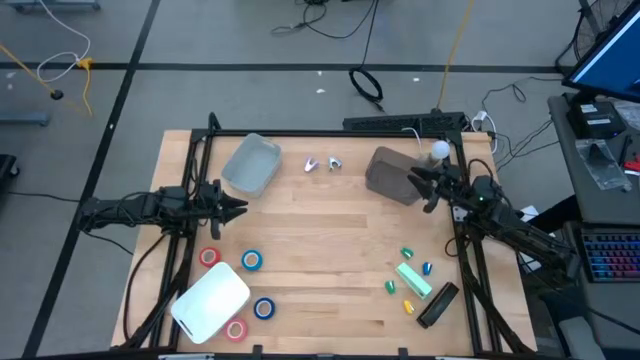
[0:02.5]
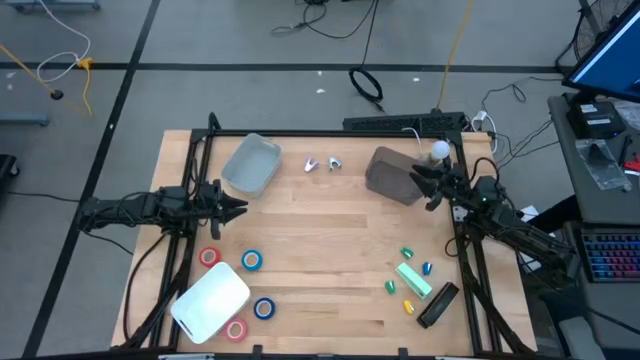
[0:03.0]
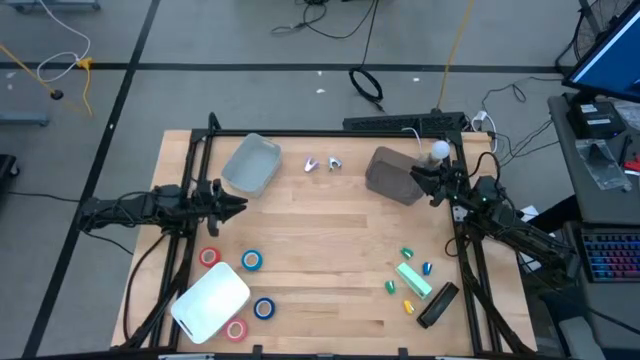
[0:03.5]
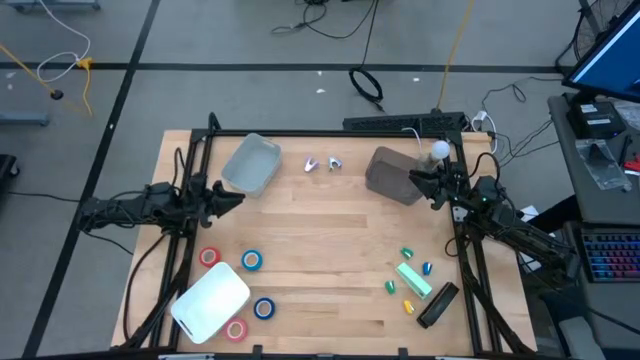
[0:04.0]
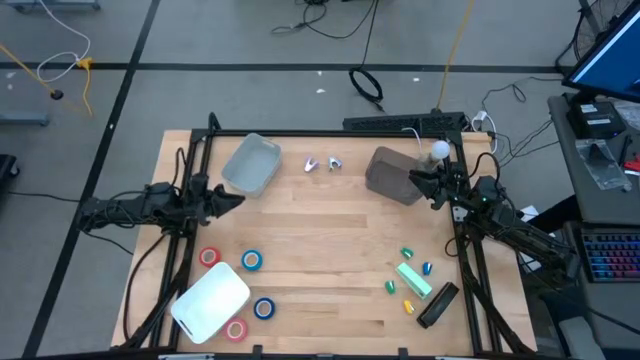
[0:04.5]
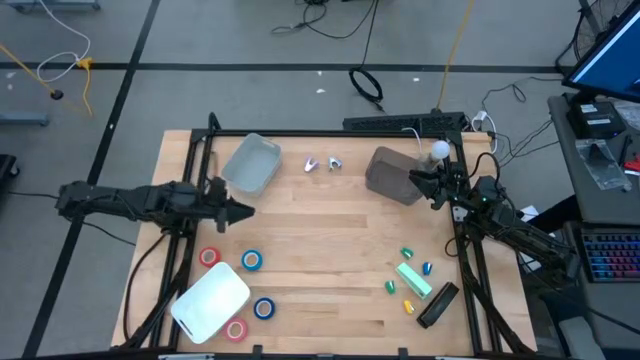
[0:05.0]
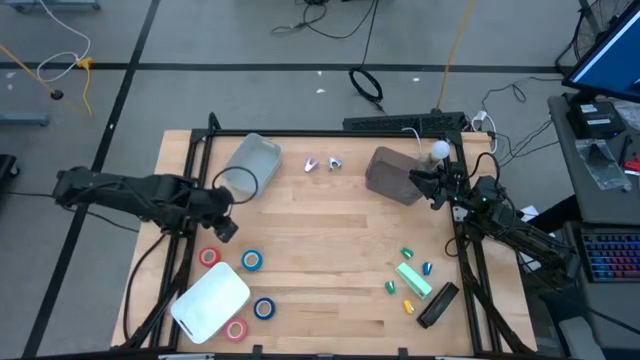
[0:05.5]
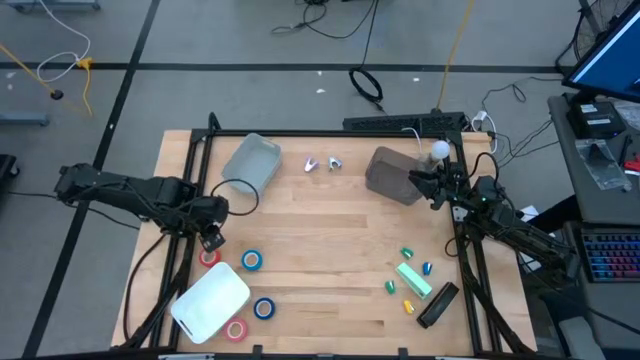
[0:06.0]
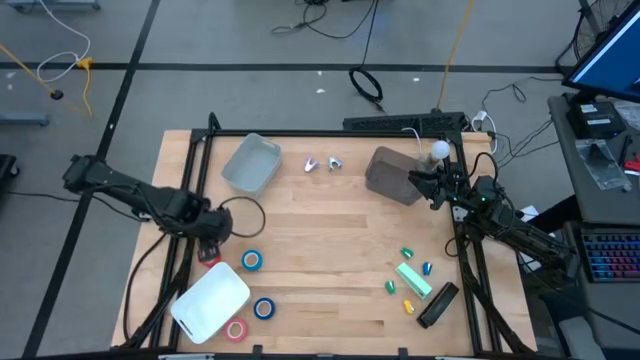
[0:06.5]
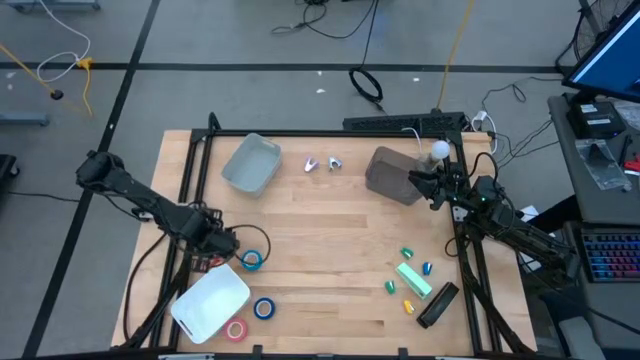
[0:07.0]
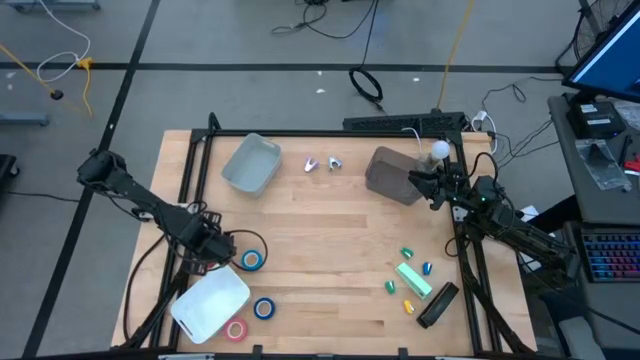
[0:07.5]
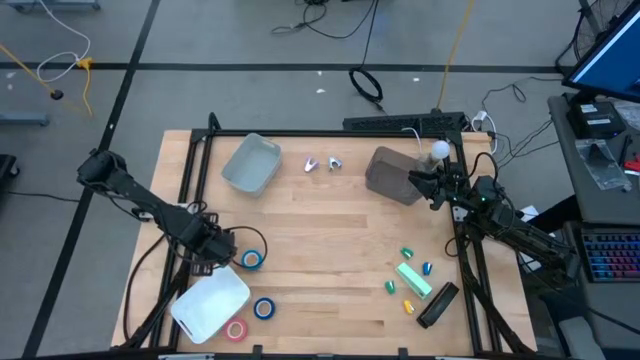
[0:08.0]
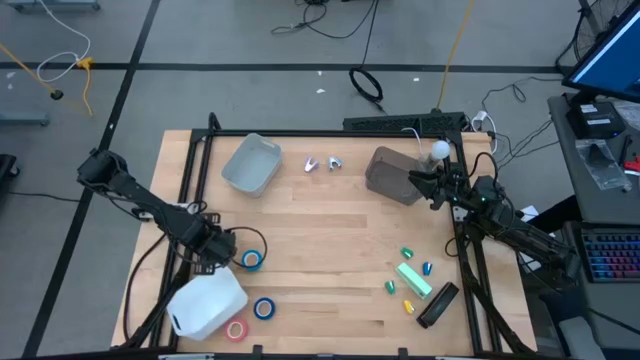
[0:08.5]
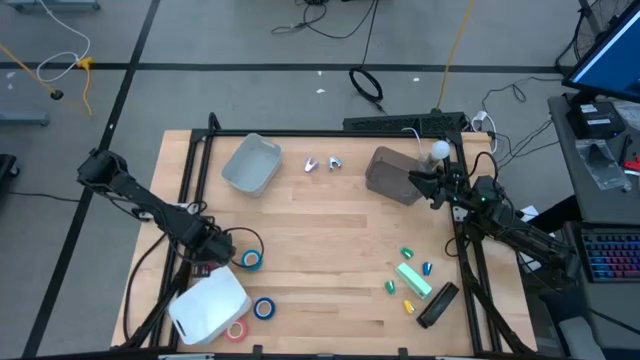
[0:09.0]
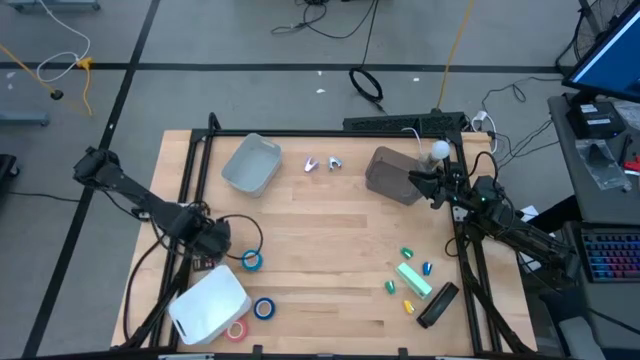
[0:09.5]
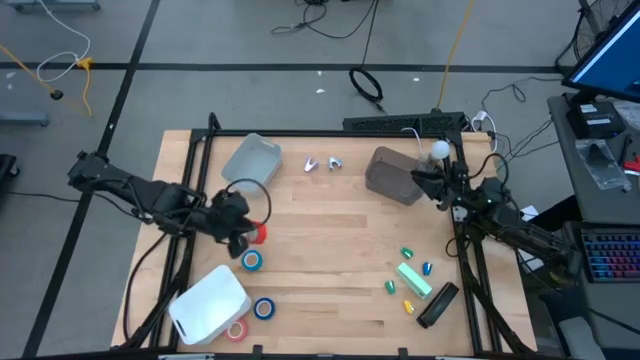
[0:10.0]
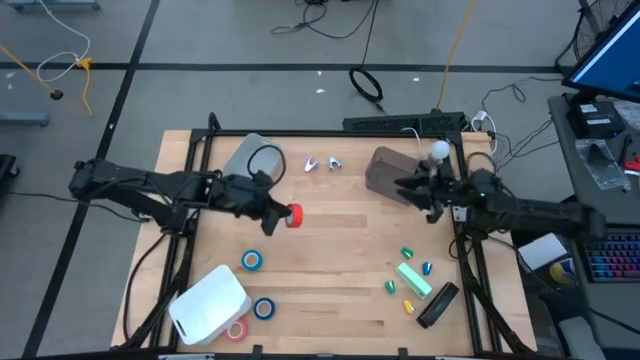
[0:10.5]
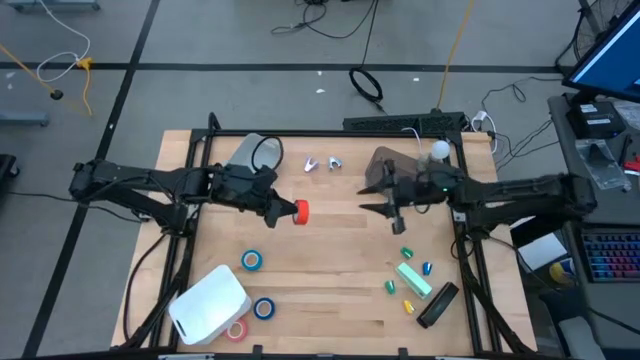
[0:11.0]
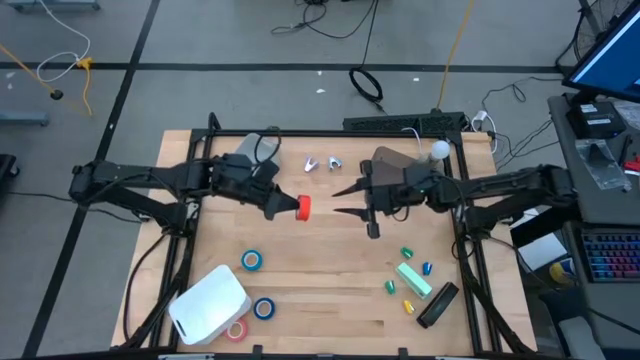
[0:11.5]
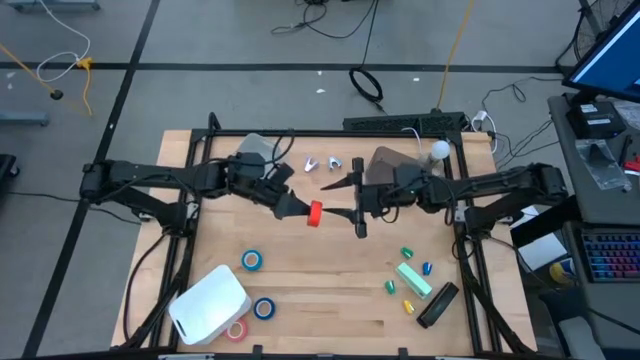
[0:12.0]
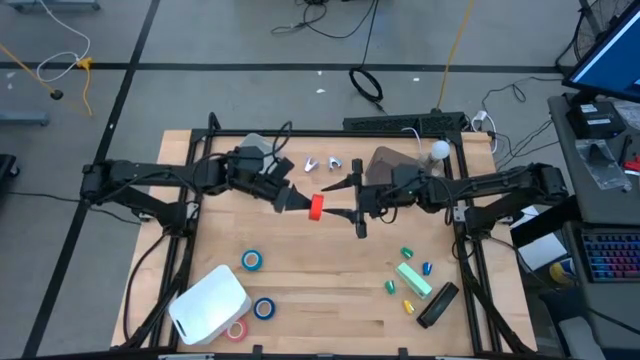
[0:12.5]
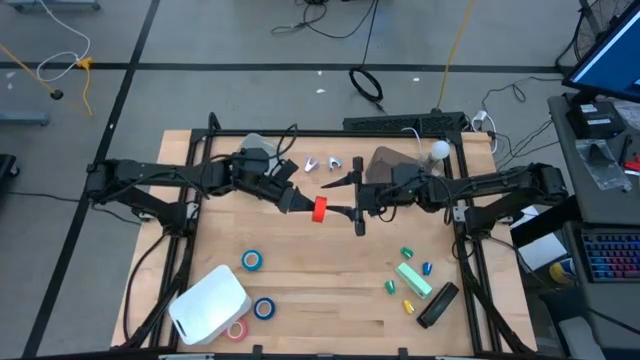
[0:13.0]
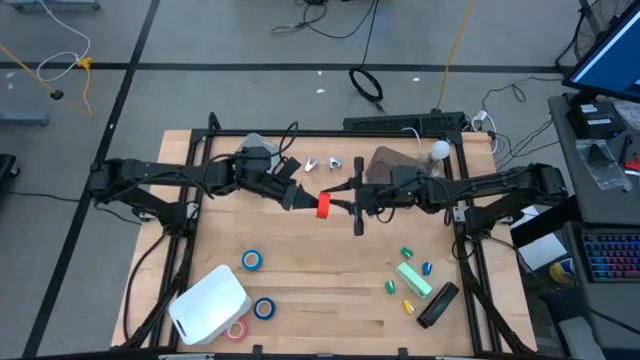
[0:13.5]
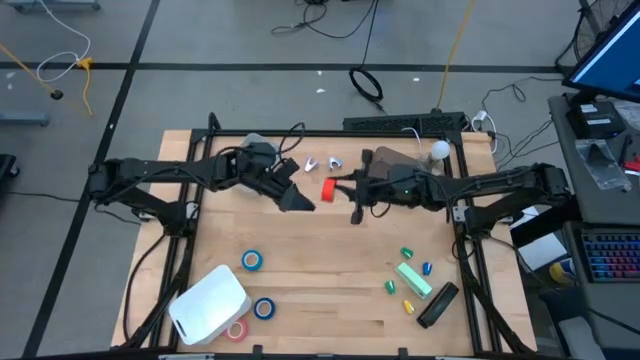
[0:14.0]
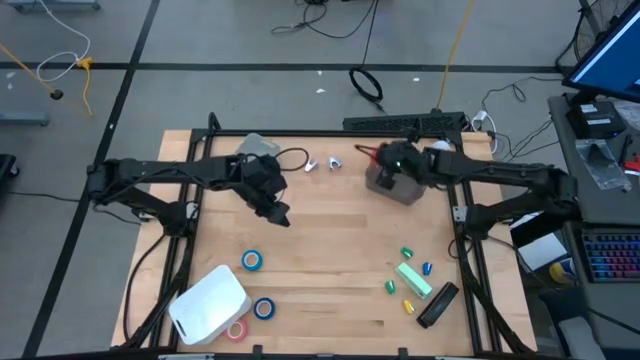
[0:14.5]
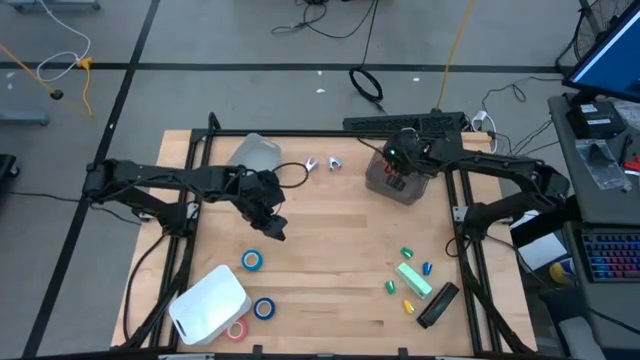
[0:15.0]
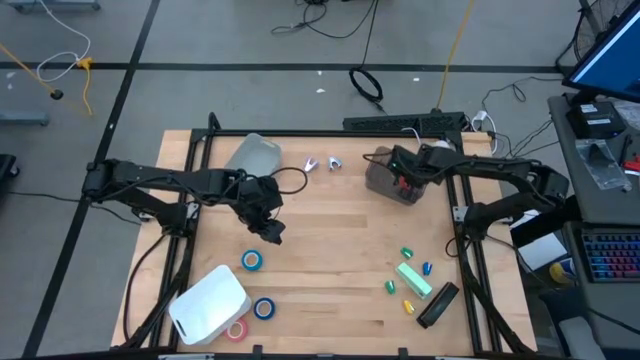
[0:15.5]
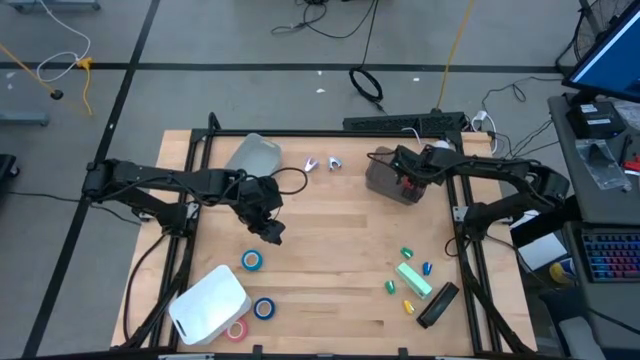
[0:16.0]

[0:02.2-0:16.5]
Task: Pick and place Stapler, Stapler remover, tape
Put the orange tape into the black bin

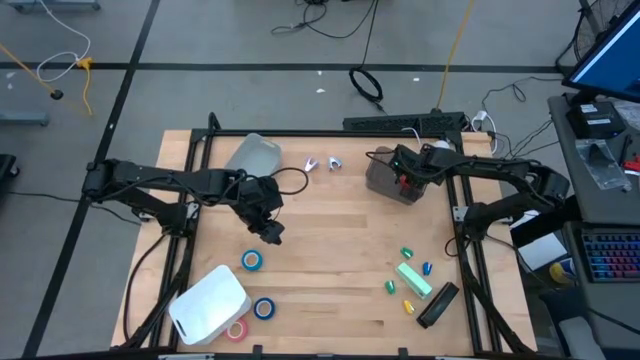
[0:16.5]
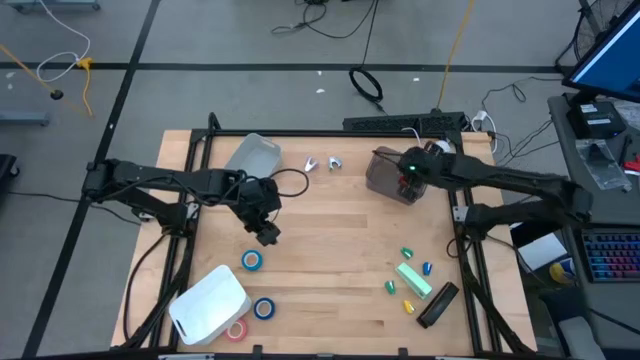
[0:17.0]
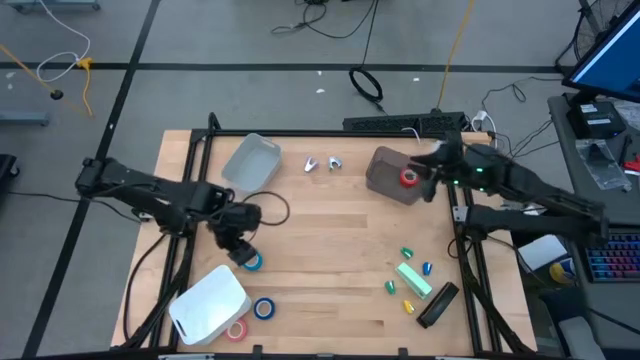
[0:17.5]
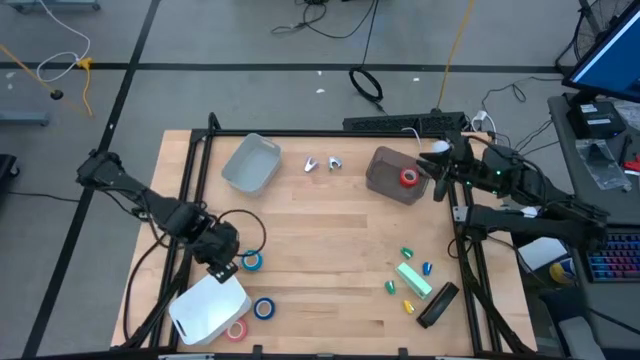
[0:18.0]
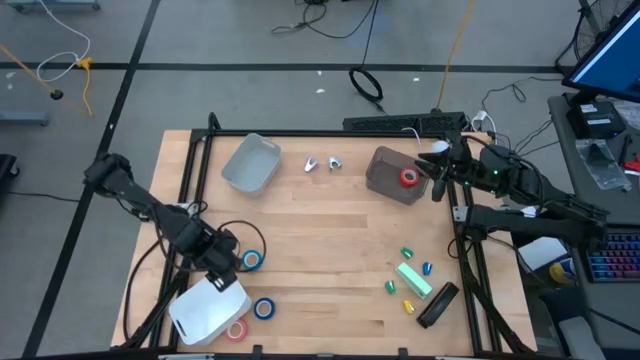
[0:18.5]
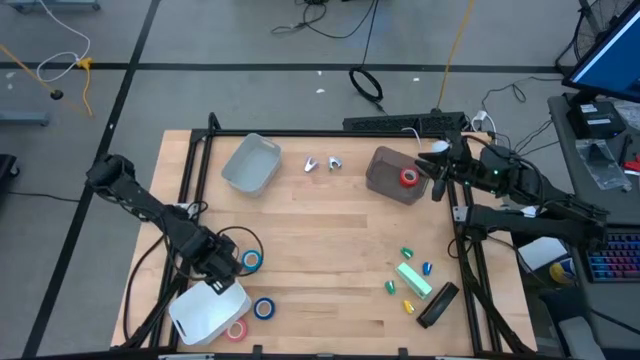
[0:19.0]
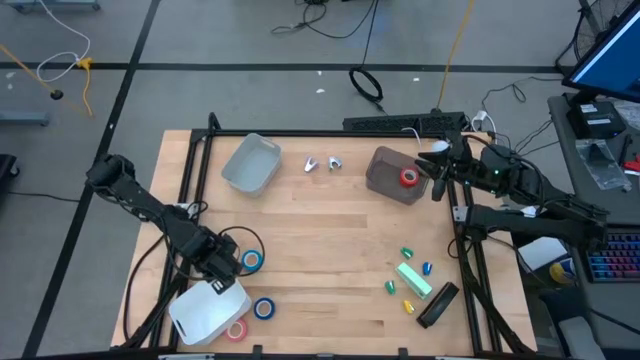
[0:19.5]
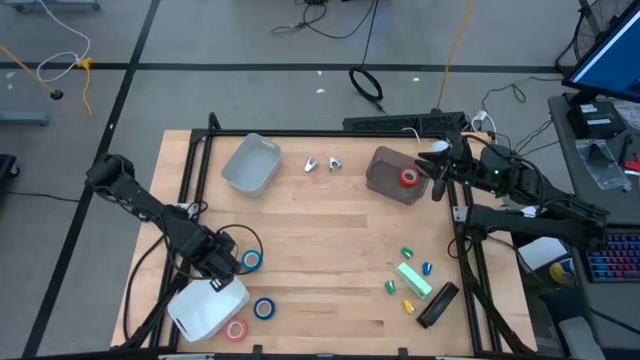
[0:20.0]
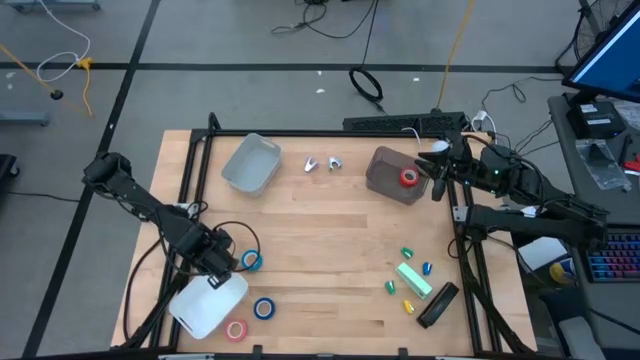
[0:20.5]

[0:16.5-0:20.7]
Adjust the white bin
